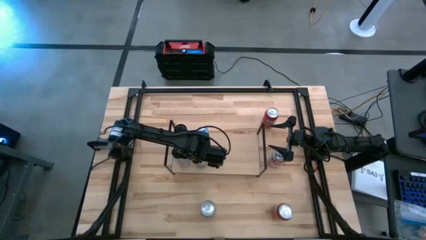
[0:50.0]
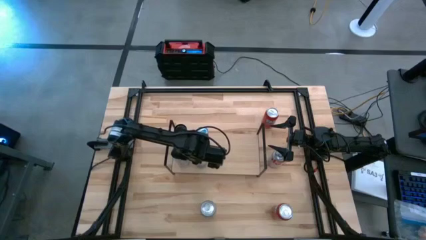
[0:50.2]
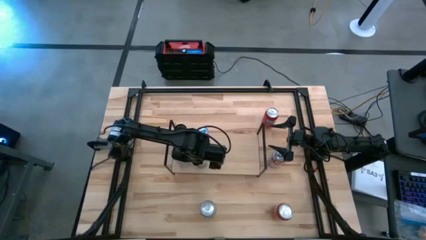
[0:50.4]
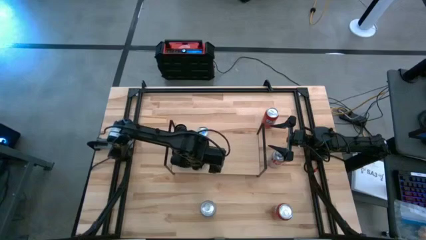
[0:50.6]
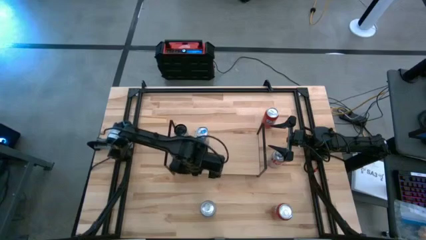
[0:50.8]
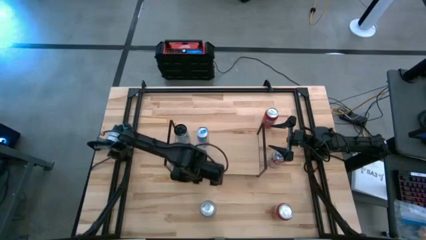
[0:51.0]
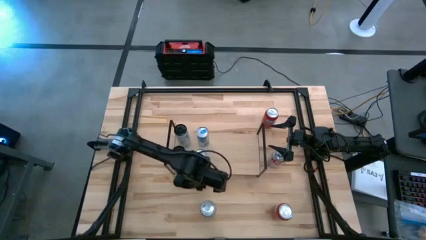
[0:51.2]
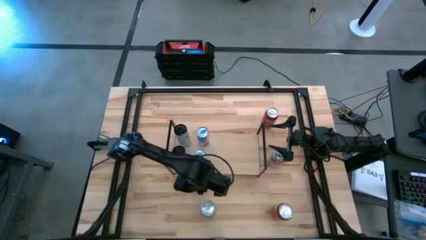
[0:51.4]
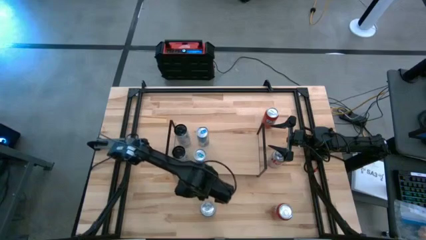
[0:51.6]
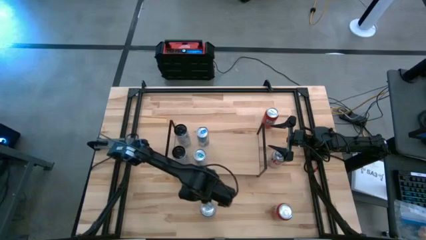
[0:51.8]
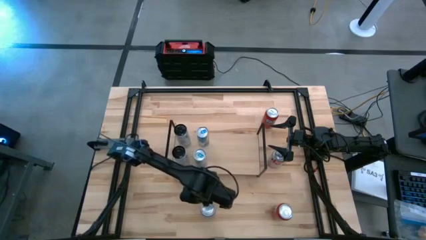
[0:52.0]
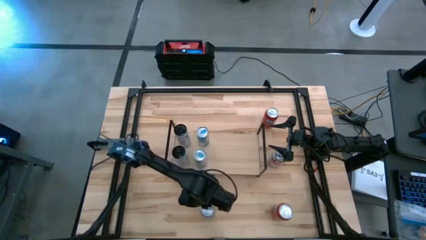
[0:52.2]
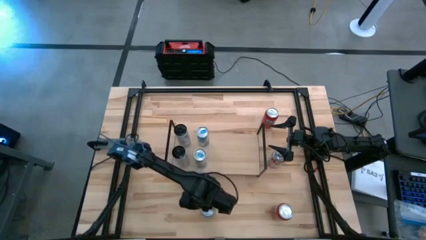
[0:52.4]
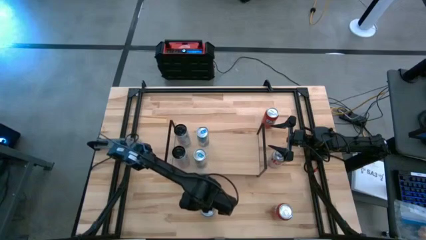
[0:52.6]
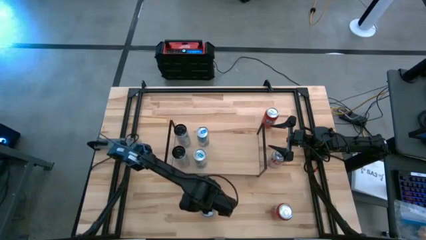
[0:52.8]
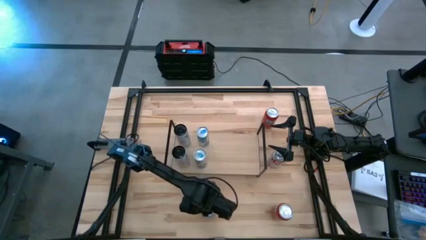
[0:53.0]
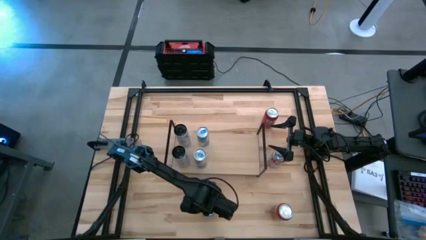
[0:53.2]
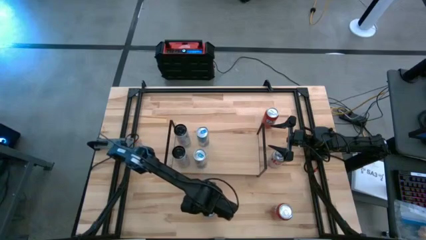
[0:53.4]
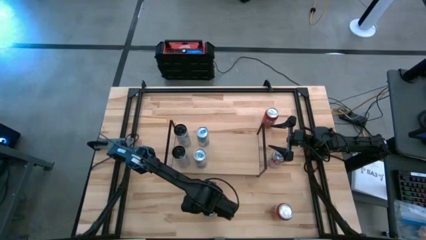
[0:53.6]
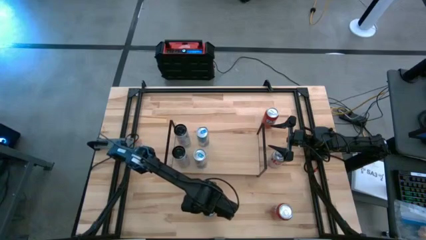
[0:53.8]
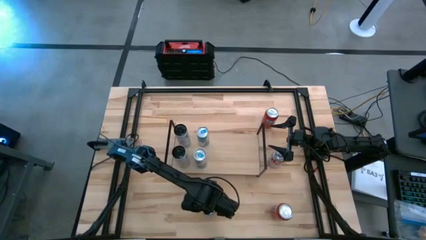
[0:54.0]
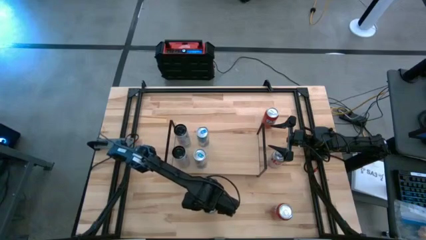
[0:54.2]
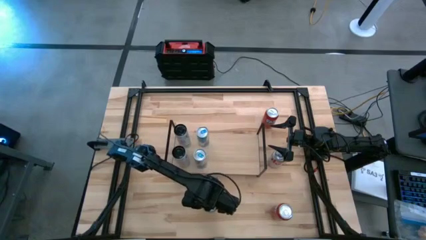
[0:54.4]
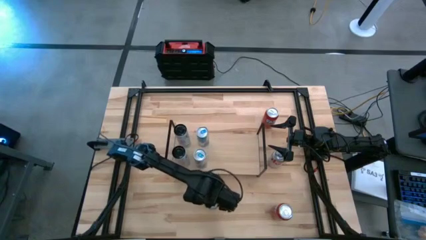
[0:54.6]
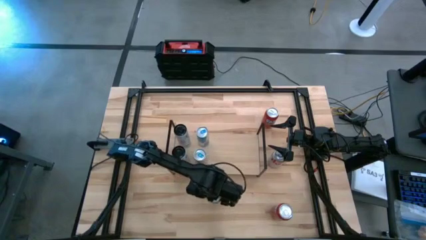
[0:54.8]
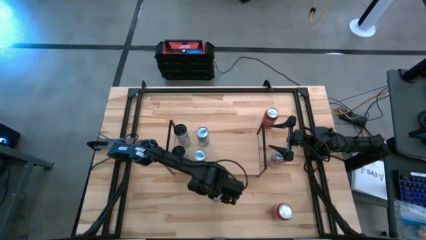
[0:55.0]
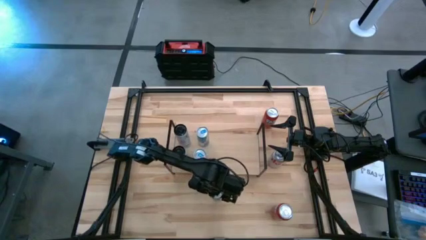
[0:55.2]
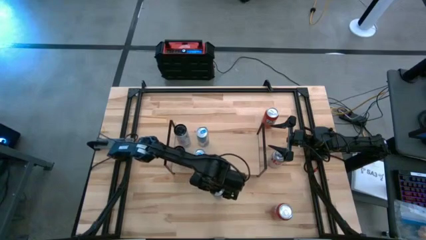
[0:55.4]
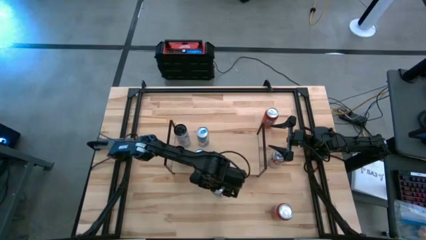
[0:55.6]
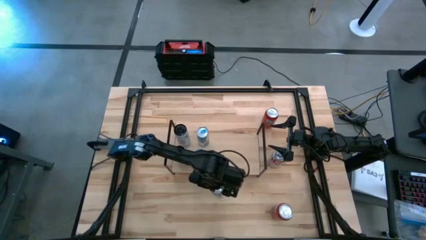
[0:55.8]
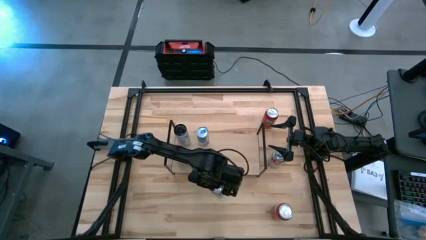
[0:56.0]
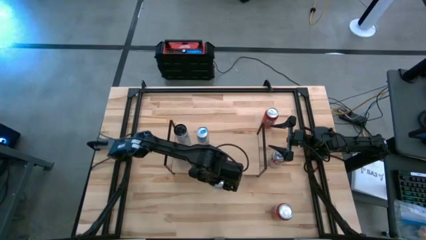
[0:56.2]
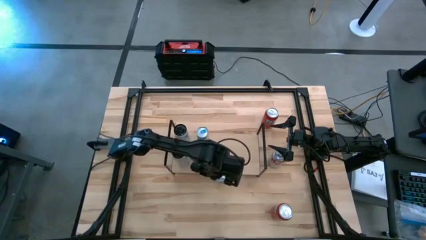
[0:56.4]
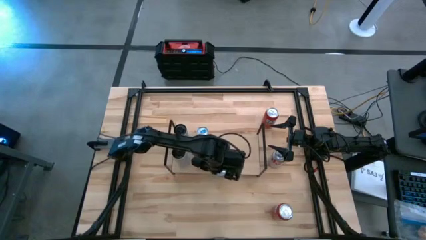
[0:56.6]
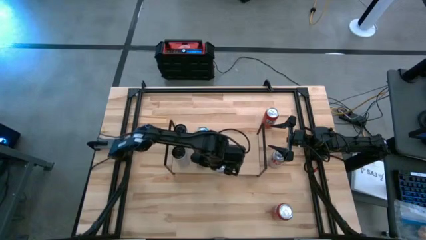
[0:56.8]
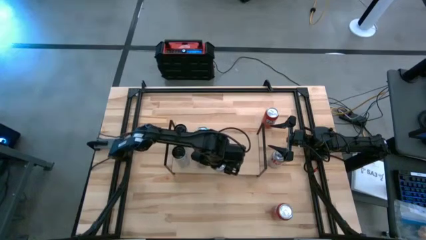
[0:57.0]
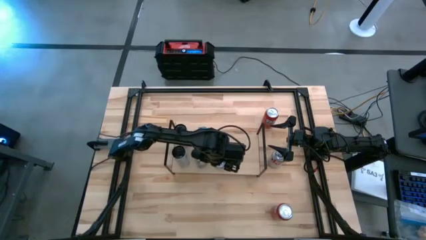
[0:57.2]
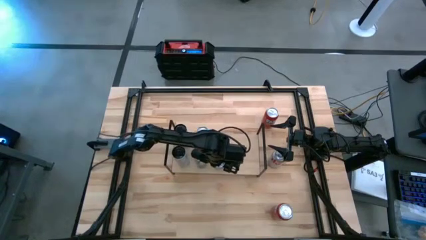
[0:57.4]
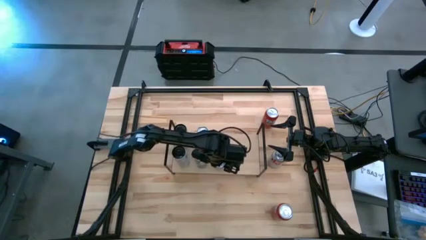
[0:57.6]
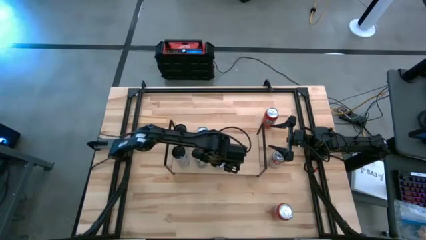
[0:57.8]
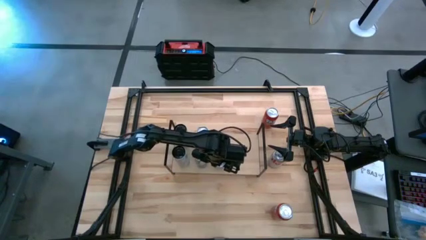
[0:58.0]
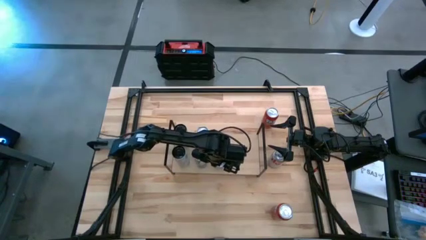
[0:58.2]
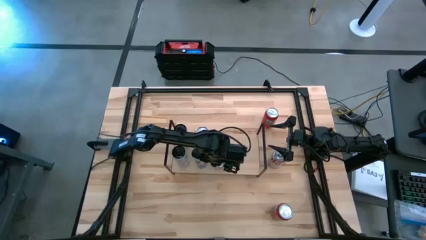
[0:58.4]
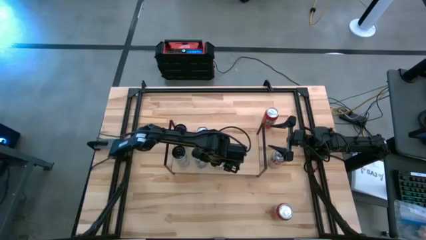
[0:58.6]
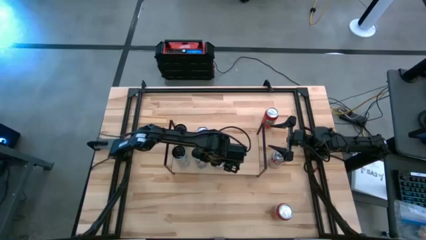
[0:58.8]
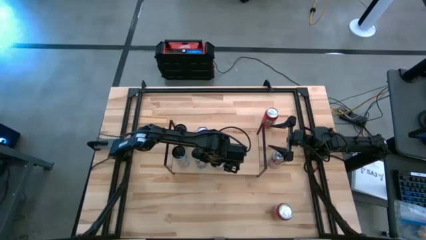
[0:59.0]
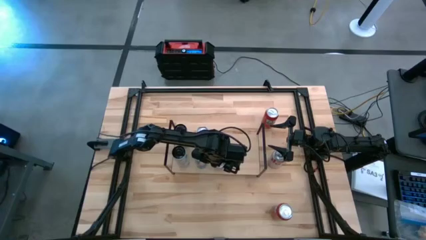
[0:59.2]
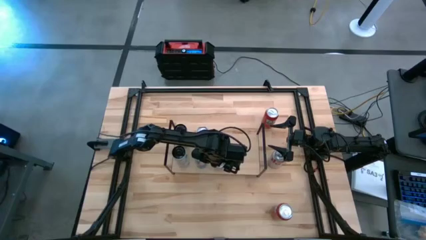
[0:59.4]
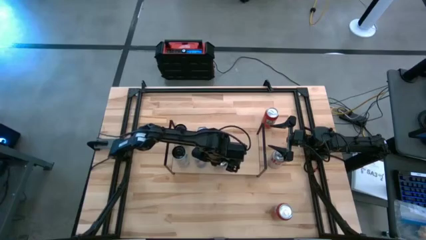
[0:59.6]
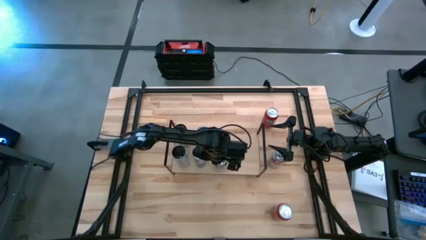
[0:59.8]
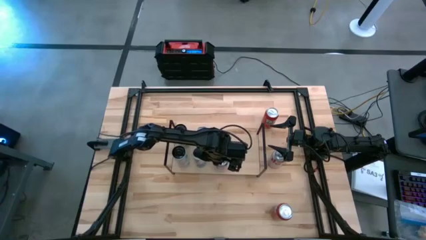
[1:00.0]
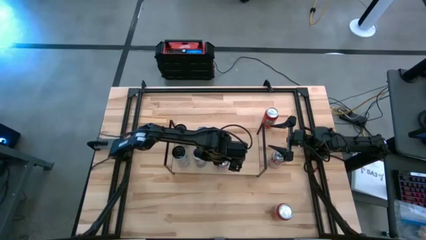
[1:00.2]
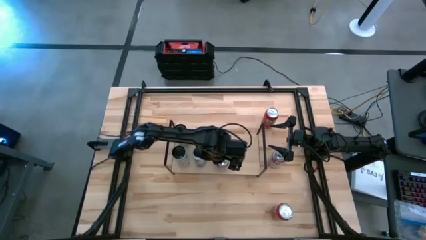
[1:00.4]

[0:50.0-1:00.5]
Task: Place canned beverage on shelf
Put the bottom red-silver soda can on the shelf

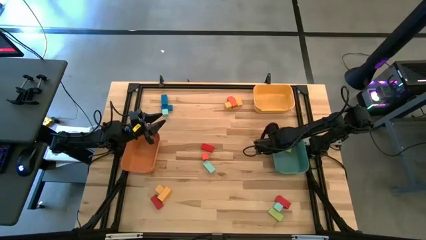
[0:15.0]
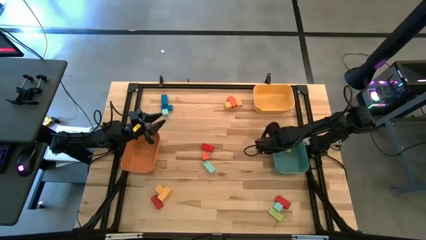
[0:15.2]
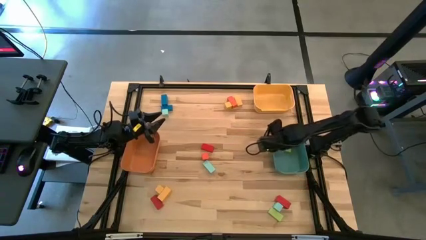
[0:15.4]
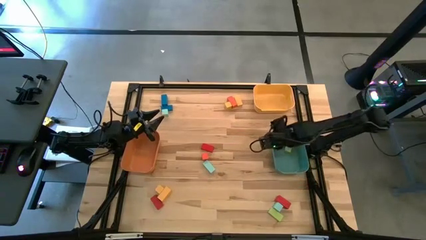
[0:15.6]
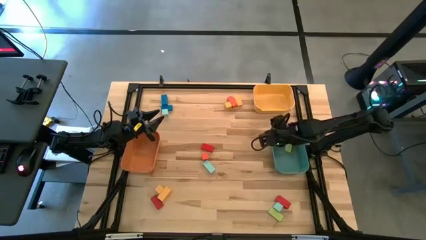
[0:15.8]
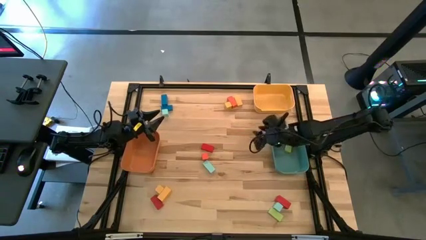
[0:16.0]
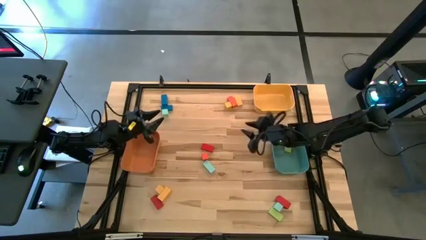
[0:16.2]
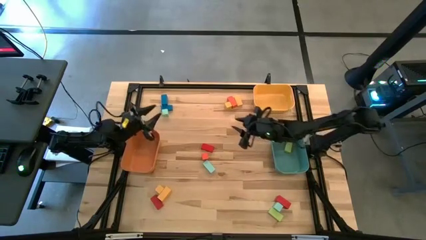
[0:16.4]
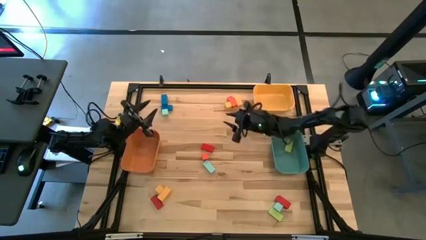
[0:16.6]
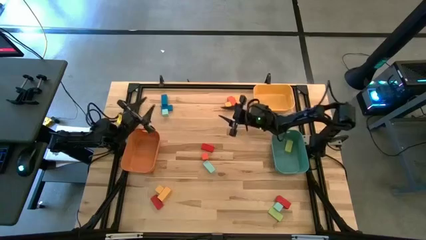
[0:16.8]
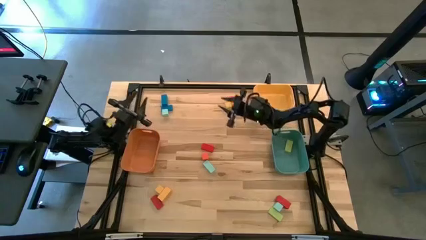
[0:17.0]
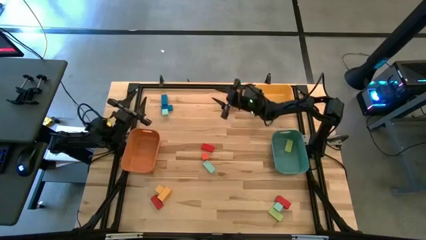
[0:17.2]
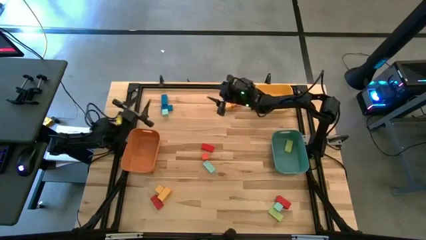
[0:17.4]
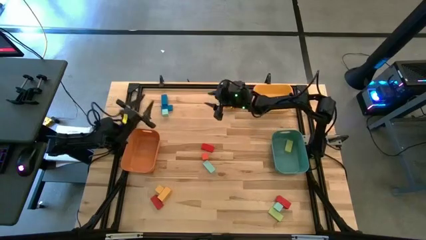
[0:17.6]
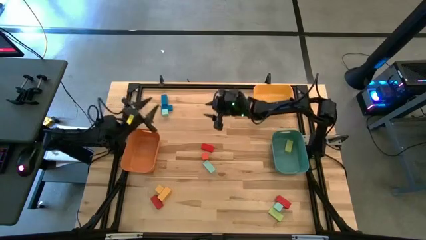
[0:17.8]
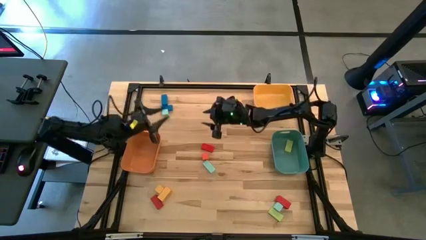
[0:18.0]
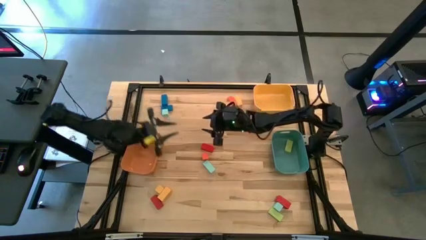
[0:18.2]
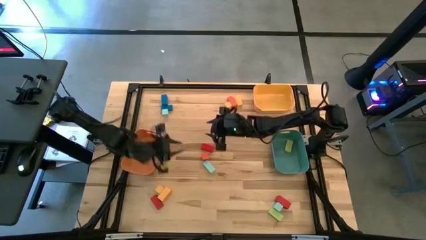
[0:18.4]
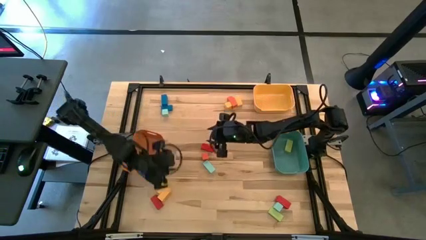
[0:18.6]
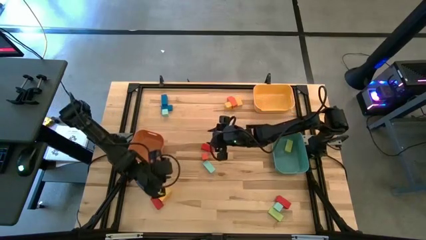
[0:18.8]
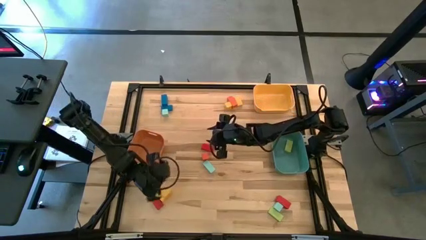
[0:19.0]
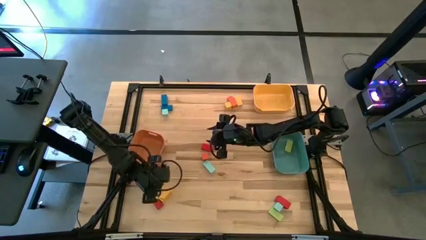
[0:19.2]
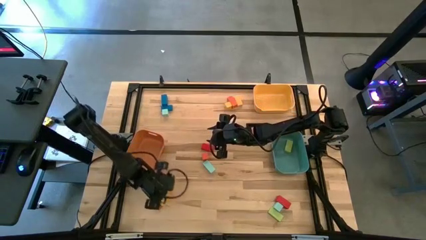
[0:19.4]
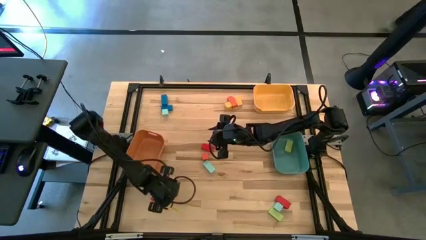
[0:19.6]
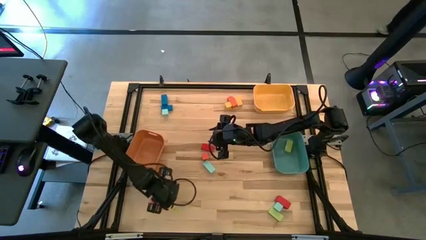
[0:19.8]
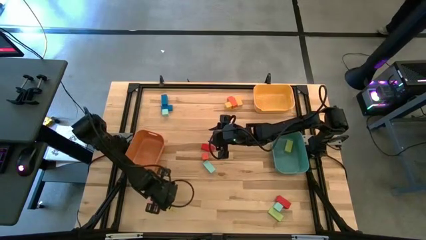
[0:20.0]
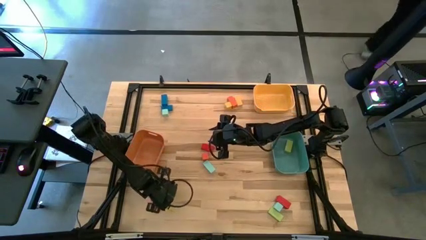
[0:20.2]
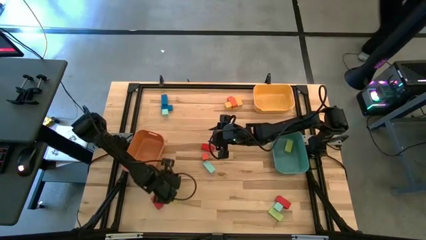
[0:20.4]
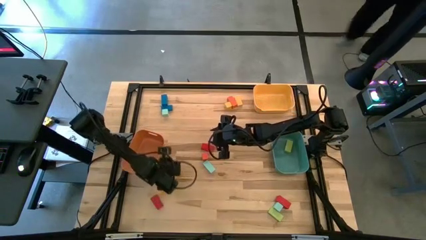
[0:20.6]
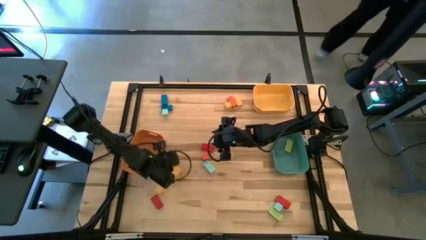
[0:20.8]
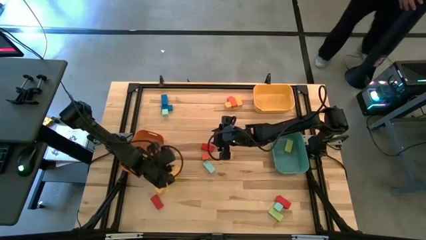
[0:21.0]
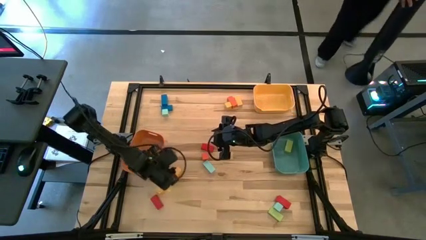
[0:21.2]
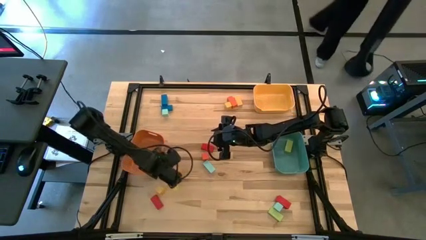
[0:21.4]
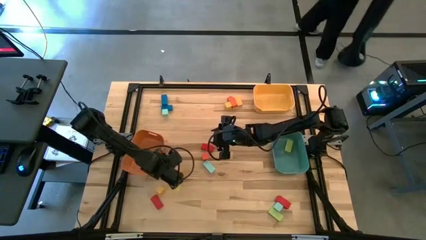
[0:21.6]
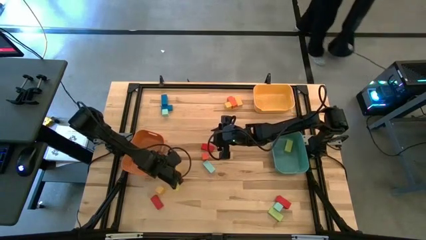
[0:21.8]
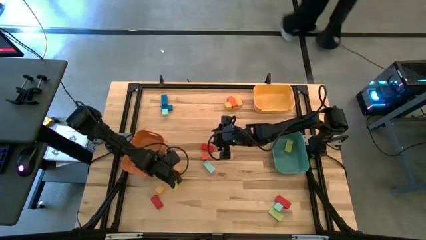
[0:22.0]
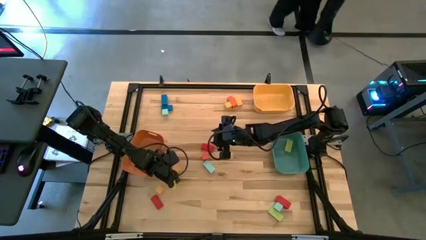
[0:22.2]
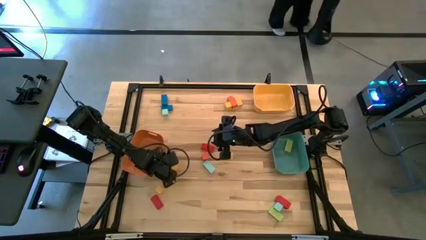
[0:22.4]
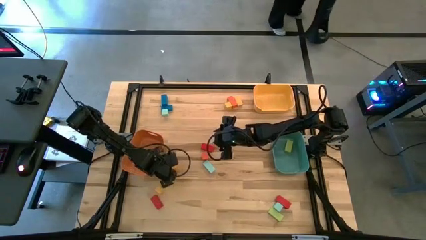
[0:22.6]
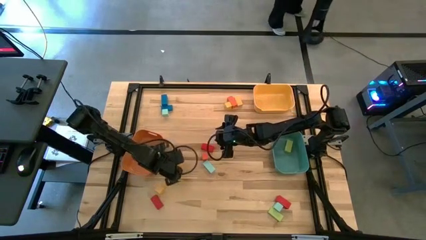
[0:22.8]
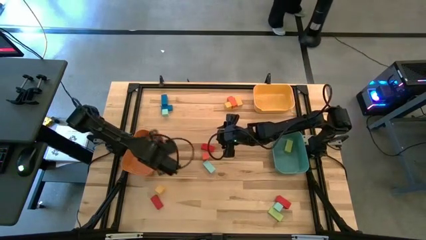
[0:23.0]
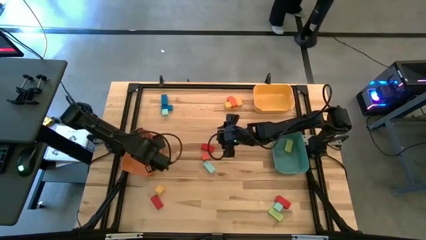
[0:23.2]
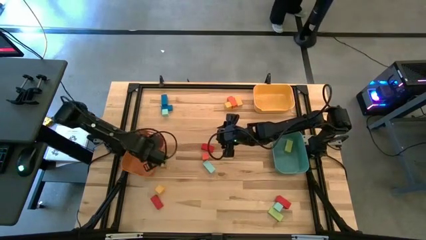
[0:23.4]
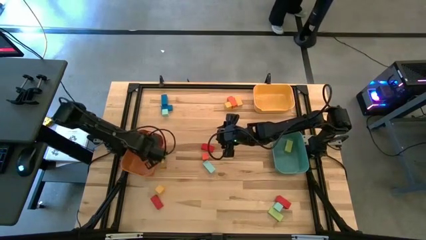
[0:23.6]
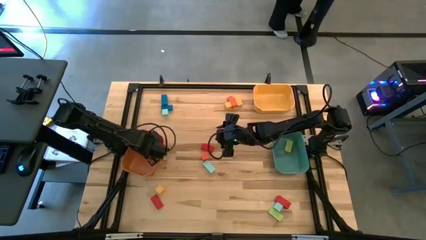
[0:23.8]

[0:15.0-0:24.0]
Task: Sort blocks by size
Put the thick yellow rectangular block into the orange bin
